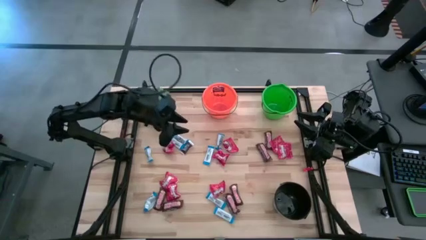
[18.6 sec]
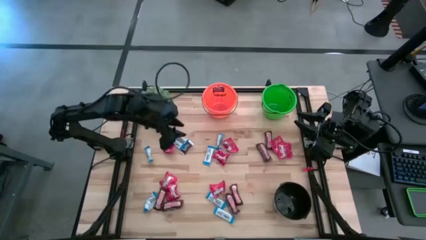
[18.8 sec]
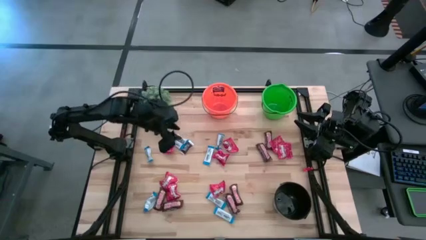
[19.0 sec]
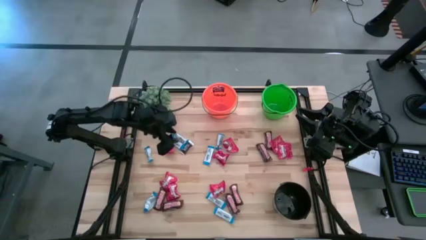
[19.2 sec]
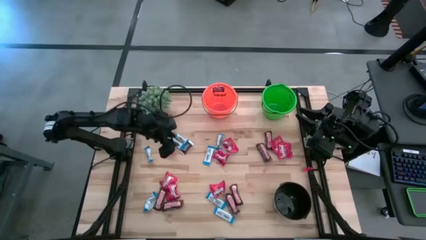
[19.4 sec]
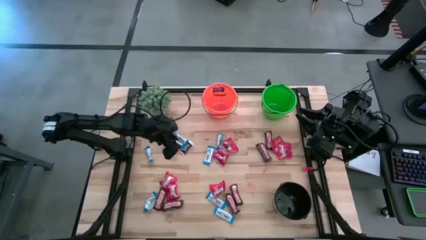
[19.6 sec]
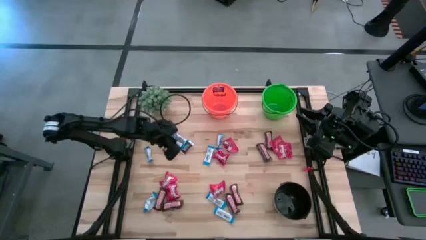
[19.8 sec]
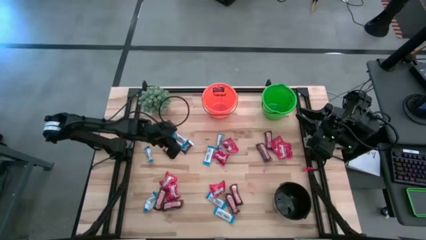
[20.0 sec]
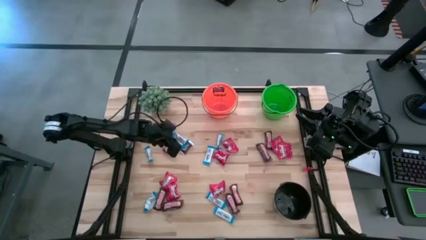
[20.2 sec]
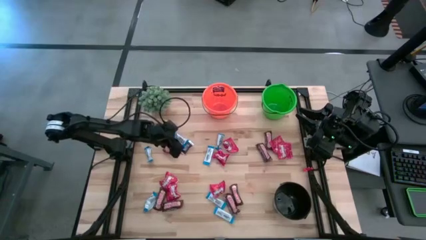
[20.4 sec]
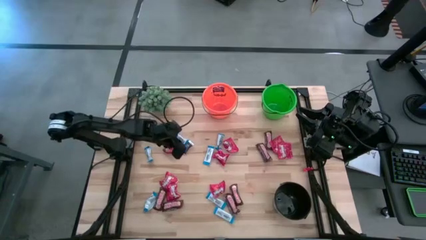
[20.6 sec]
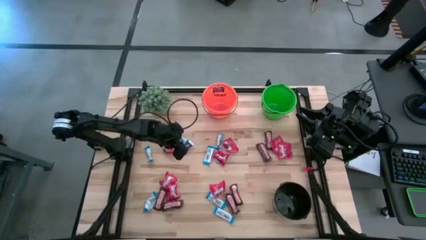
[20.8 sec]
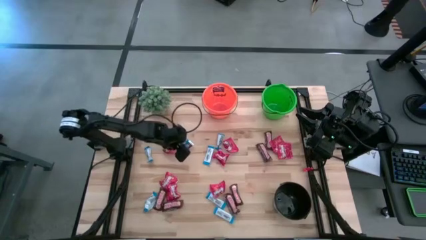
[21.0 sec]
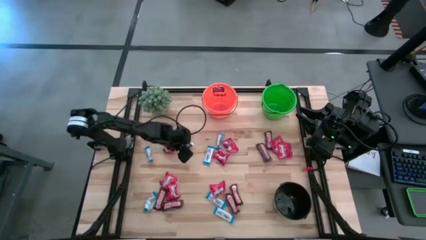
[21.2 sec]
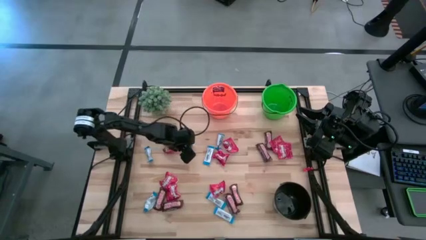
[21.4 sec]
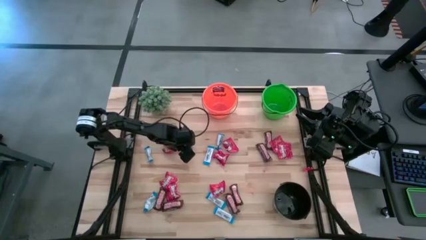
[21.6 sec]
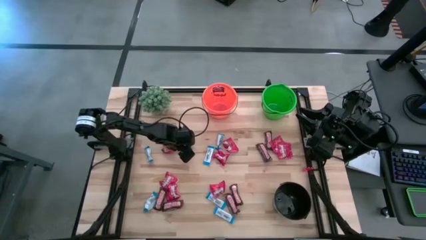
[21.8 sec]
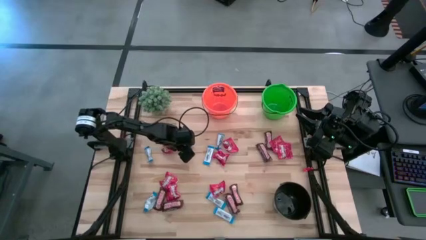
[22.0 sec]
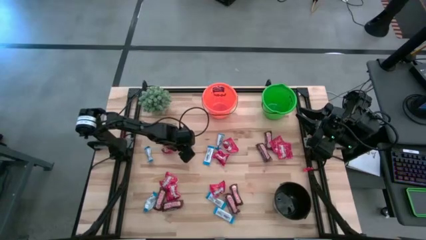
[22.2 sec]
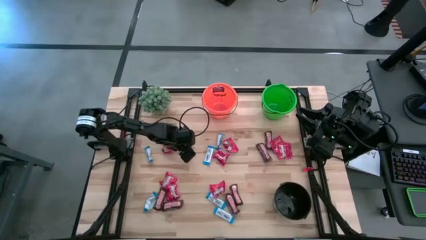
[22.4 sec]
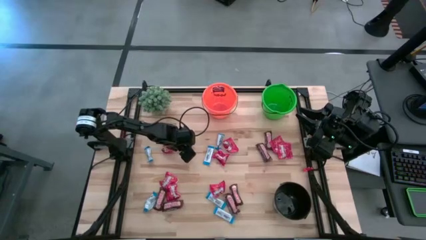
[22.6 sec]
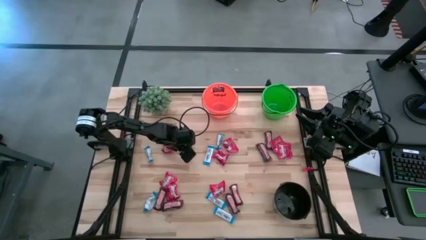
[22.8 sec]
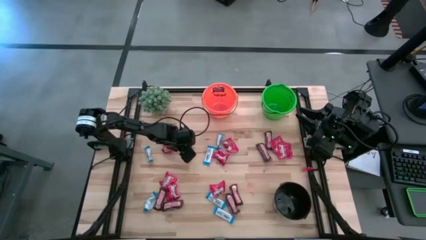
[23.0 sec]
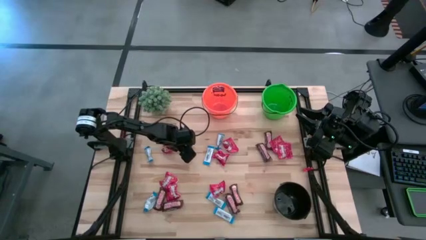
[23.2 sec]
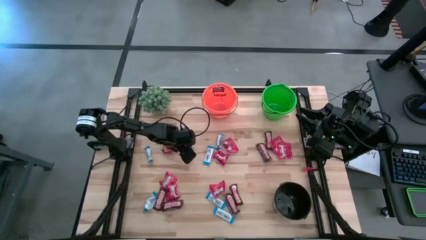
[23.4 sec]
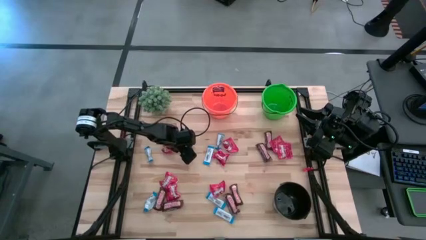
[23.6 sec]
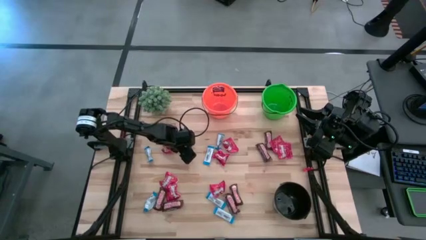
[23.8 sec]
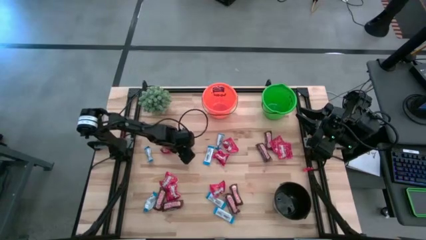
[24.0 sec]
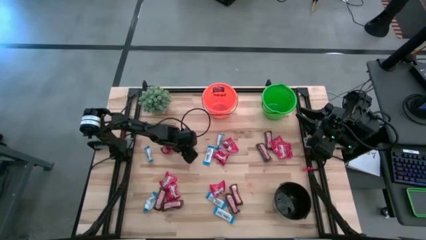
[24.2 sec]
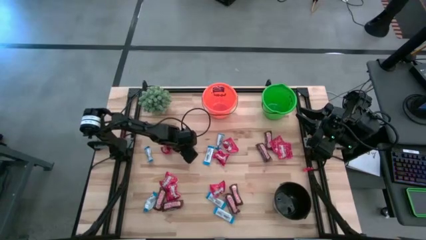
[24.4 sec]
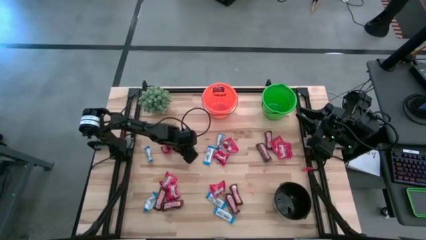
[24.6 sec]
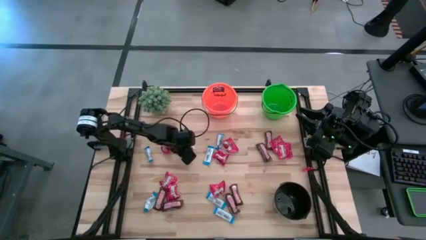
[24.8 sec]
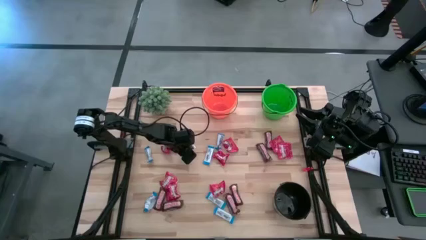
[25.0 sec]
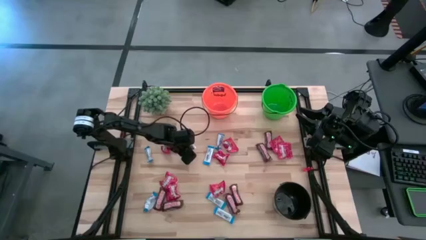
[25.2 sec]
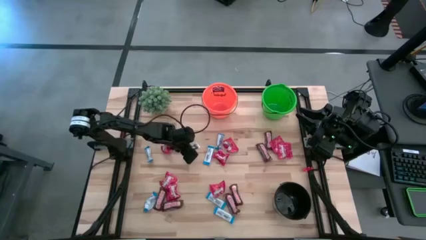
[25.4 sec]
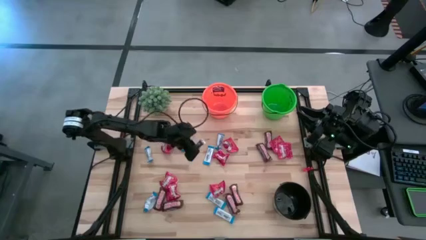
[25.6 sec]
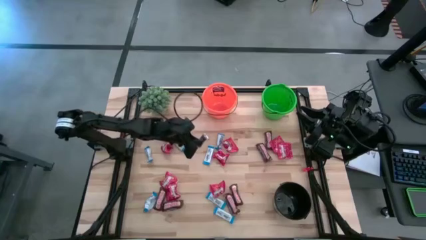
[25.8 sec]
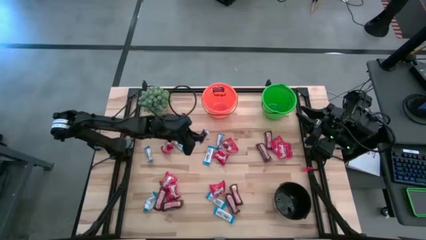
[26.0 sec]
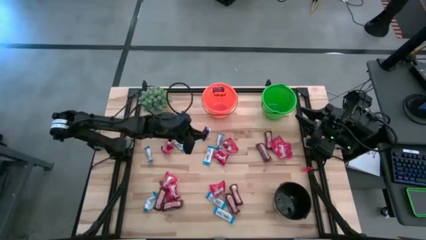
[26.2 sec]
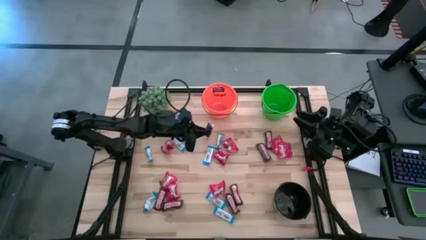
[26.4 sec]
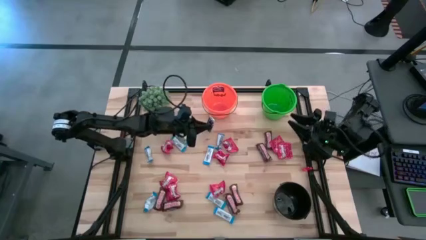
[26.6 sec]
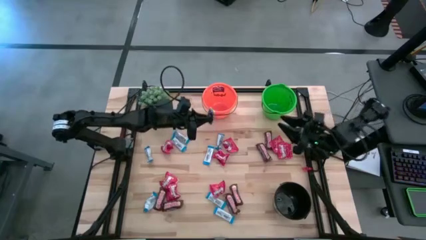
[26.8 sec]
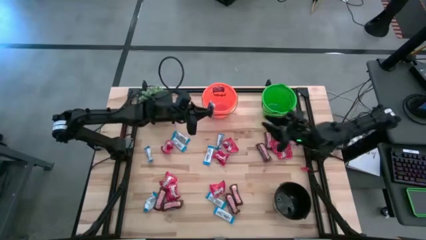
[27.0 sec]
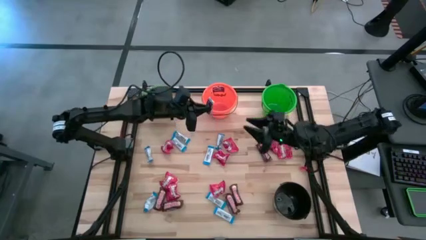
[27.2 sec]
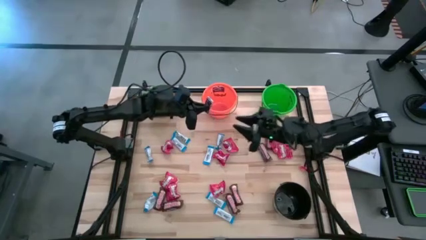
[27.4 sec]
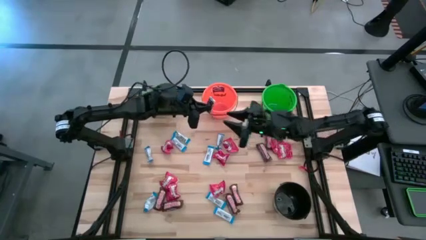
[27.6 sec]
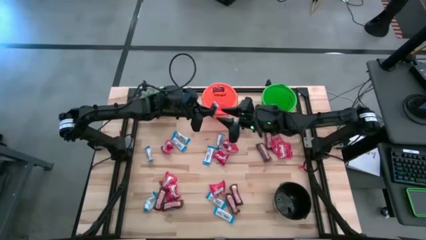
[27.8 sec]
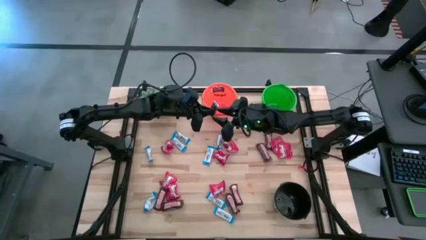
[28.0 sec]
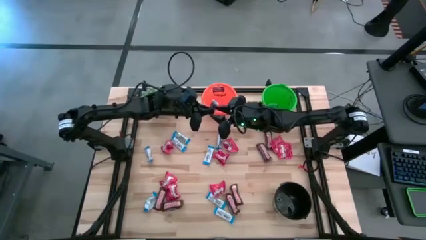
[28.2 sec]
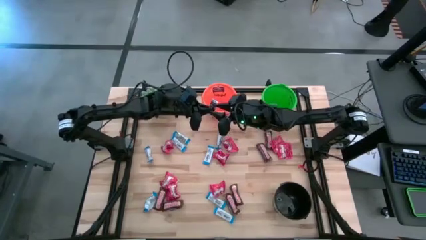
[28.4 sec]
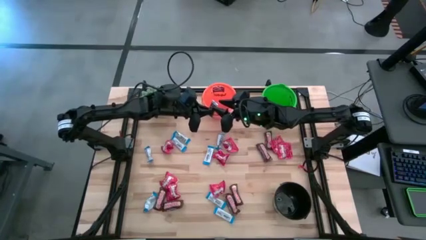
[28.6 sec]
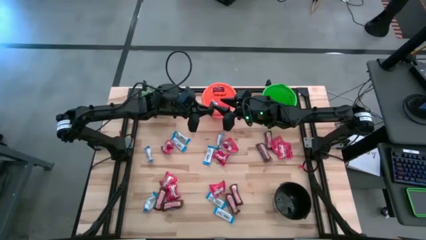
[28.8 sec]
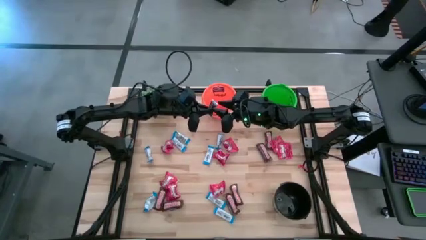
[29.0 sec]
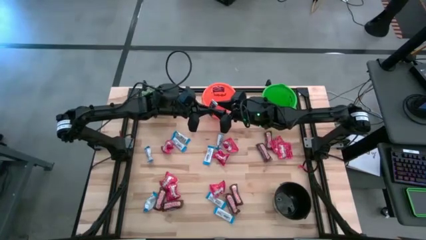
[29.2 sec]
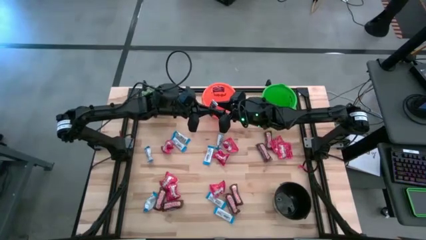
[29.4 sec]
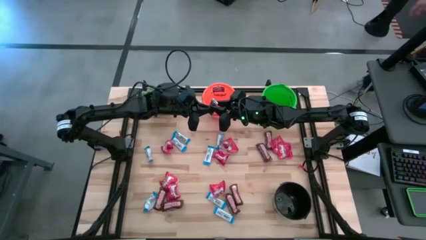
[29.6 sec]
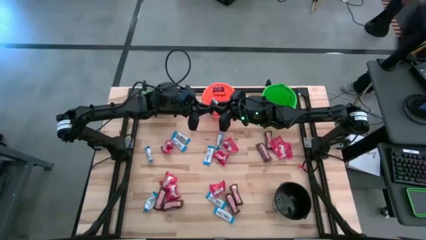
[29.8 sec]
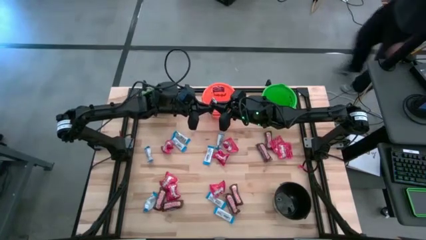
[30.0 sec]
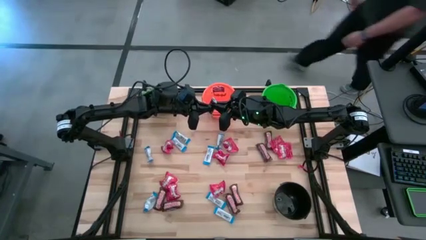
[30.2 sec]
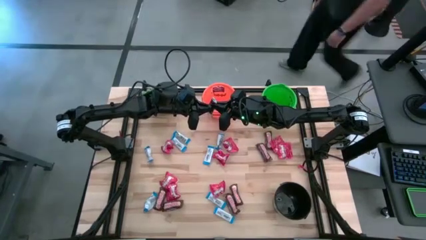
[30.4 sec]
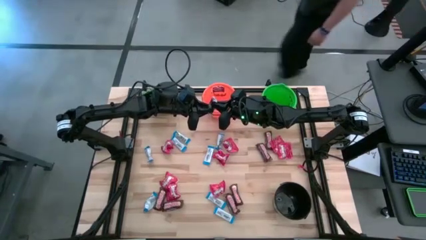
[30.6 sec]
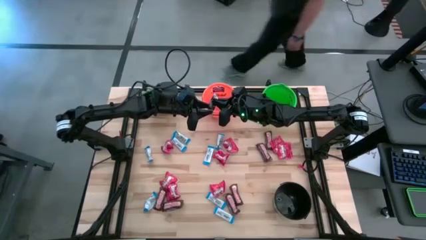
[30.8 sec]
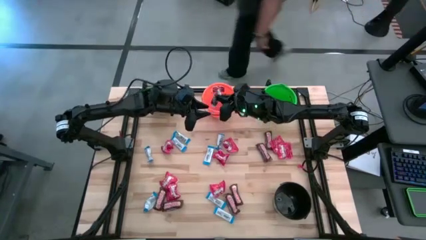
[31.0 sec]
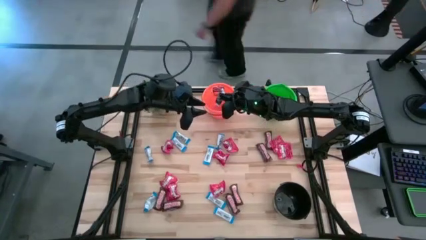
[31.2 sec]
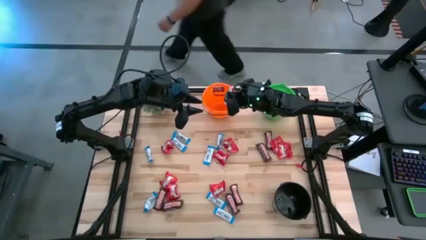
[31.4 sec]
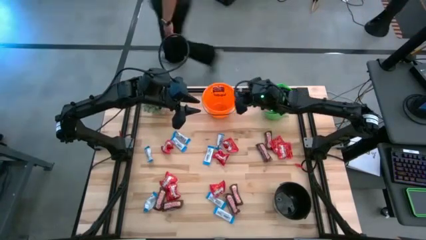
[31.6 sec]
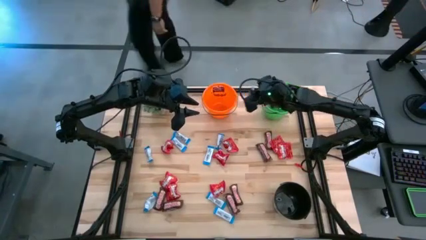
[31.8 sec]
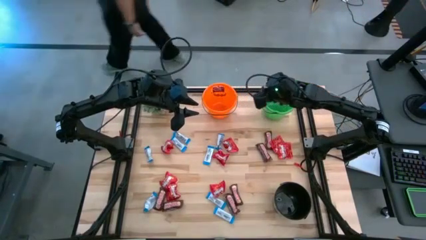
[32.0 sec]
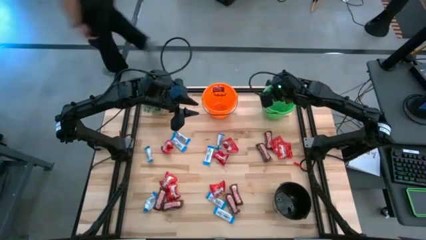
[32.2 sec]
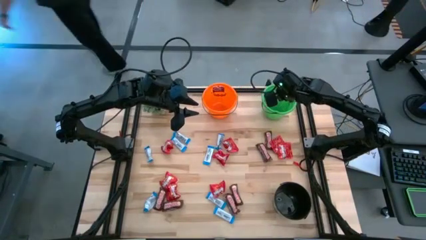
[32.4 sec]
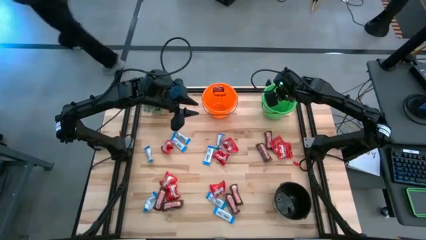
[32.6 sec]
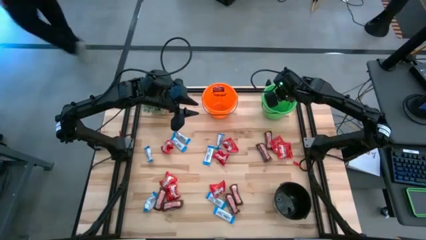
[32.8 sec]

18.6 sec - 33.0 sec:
Task: Organize candy in baskets
Put the black chocolate into the green bucket

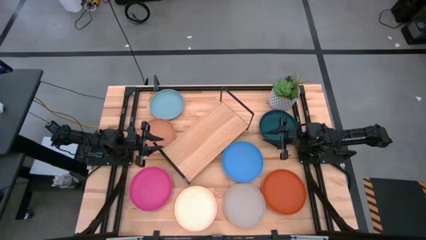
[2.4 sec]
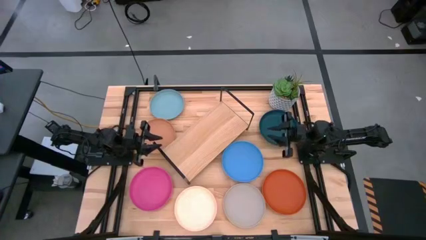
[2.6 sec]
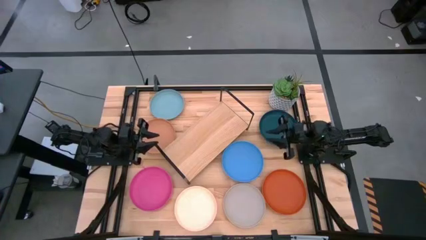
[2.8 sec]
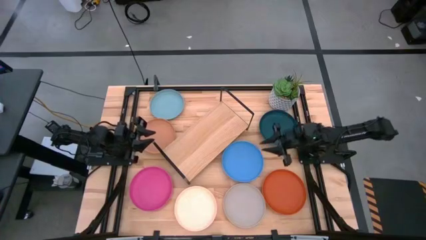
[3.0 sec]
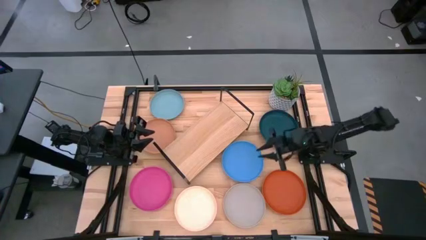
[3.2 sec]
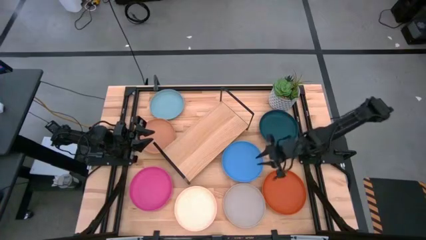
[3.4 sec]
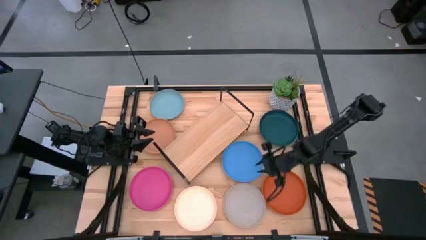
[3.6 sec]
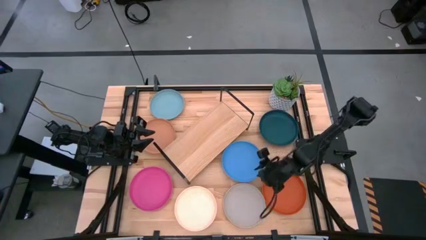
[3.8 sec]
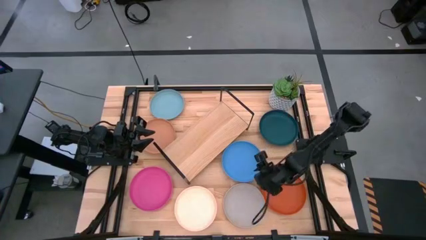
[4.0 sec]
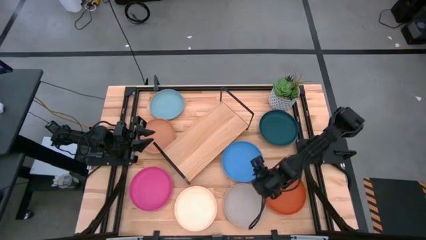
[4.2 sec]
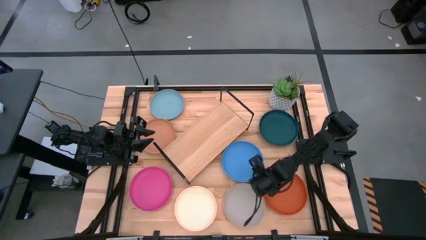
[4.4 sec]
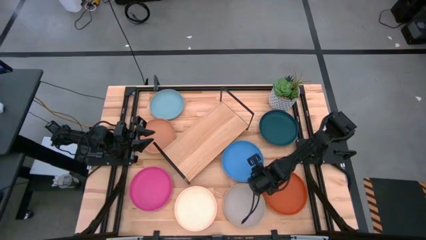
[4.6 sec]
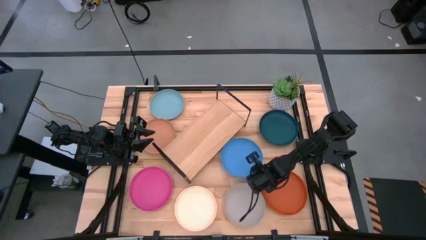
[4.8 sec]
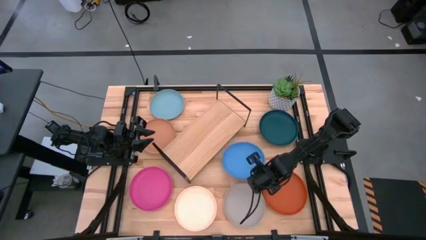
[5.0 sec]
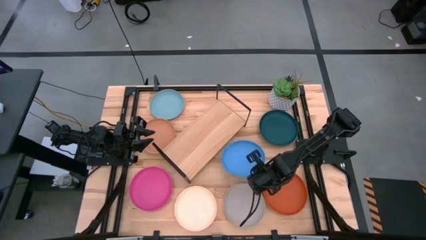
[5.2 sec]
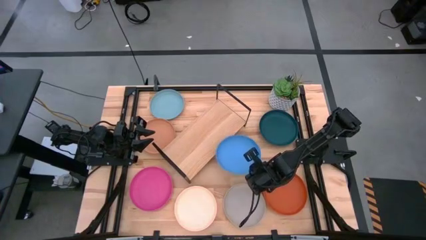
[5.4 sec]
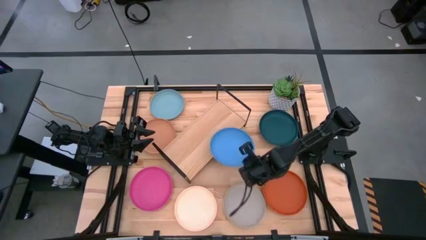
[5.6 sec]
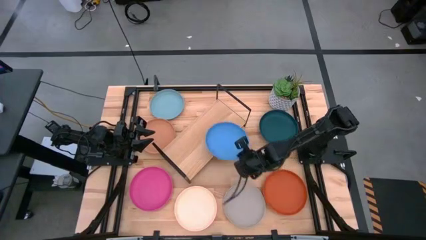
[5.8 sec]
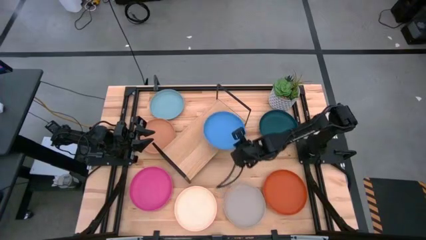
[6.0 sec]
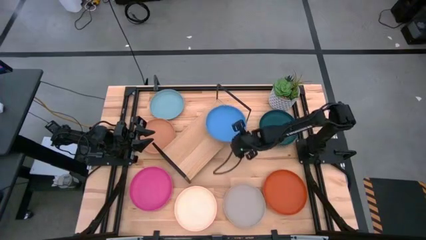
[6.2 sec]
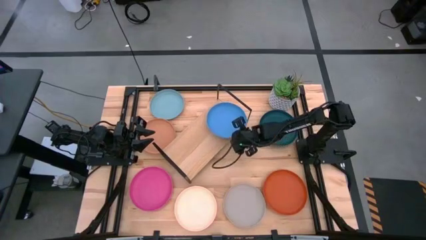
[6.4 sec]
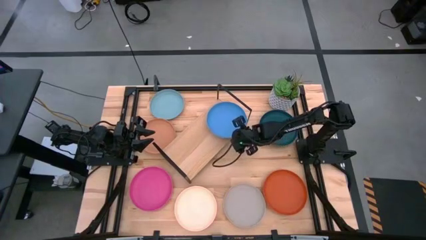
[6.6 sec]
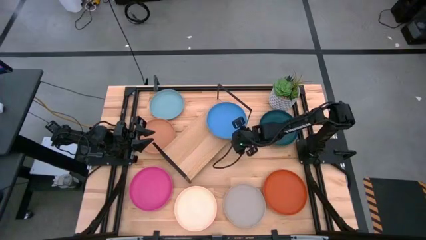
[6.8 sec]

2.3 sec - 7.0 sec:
Task: Place and stack plates onto a shelf
Put the blue plate on the shelf
